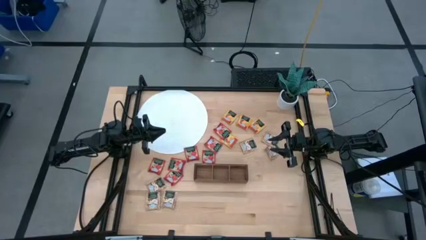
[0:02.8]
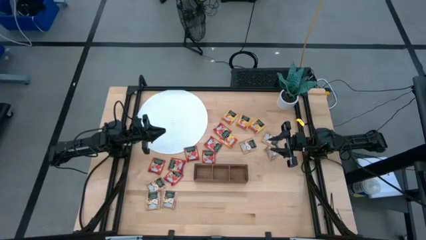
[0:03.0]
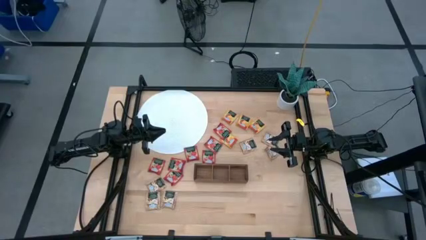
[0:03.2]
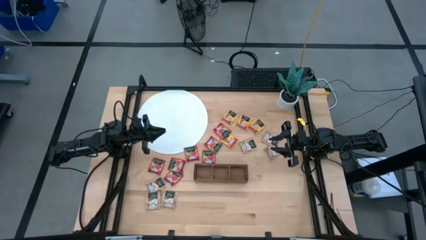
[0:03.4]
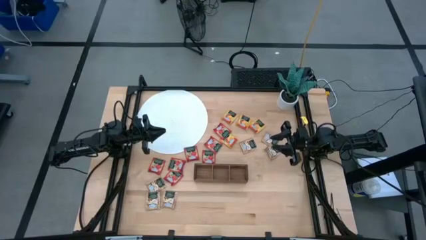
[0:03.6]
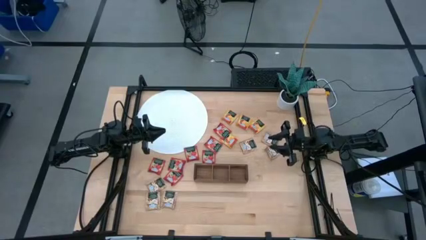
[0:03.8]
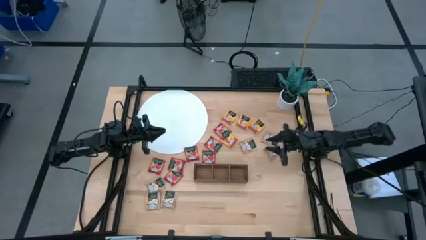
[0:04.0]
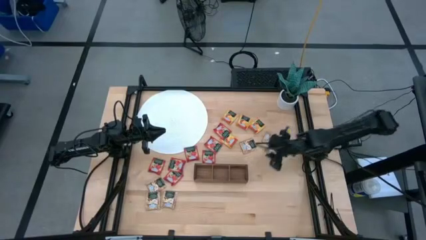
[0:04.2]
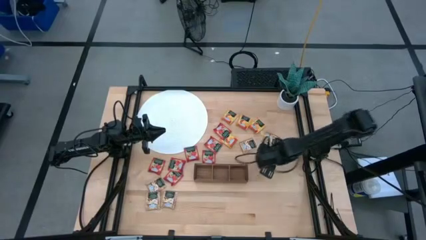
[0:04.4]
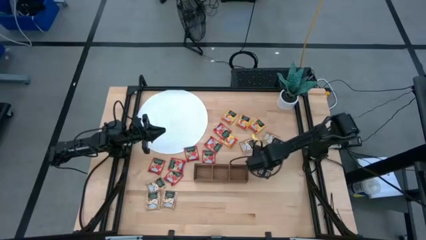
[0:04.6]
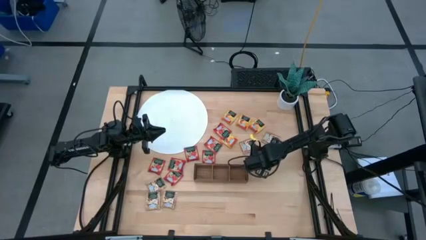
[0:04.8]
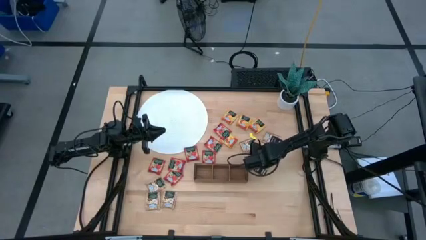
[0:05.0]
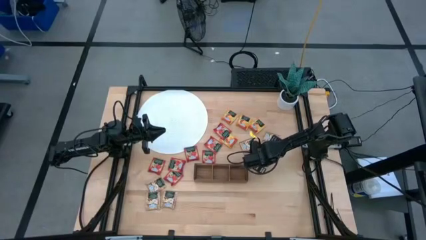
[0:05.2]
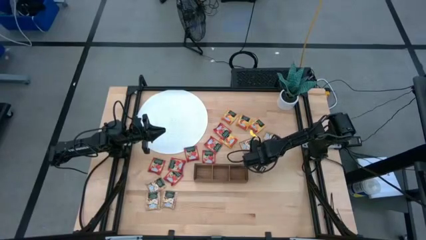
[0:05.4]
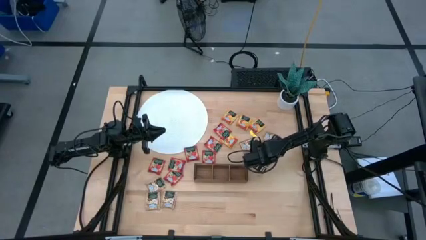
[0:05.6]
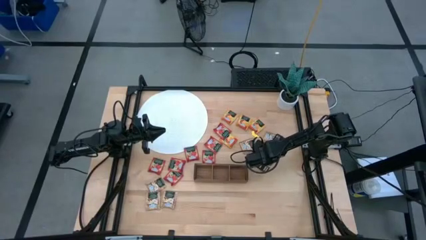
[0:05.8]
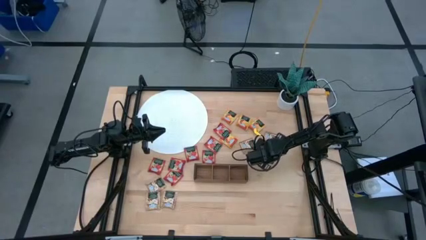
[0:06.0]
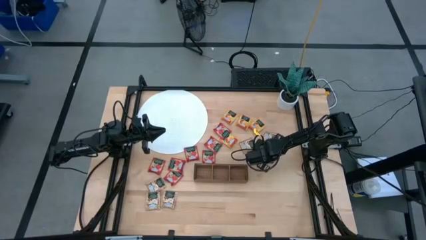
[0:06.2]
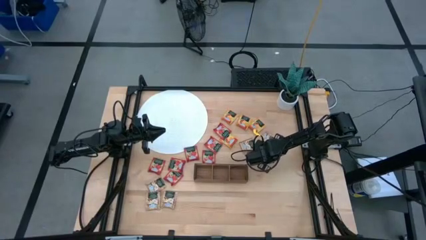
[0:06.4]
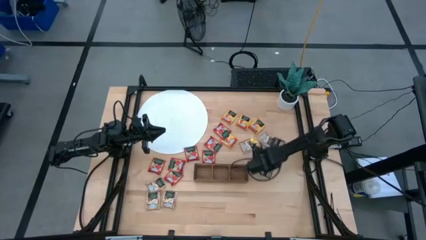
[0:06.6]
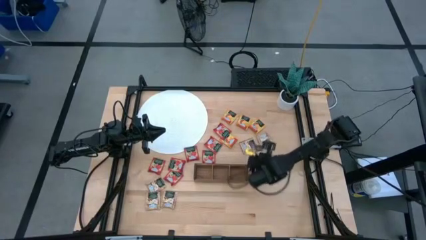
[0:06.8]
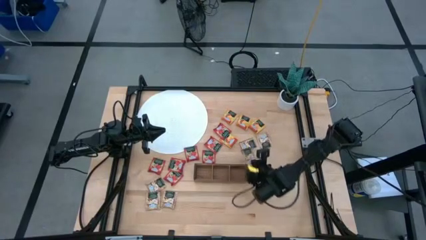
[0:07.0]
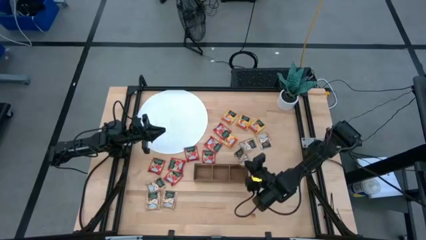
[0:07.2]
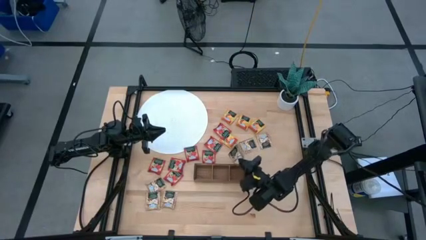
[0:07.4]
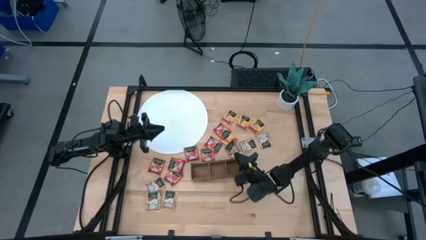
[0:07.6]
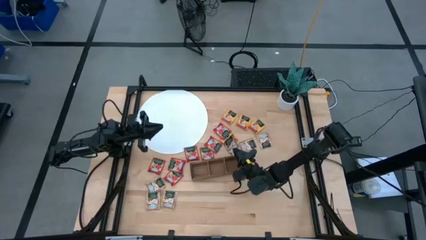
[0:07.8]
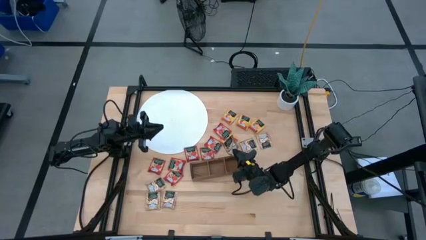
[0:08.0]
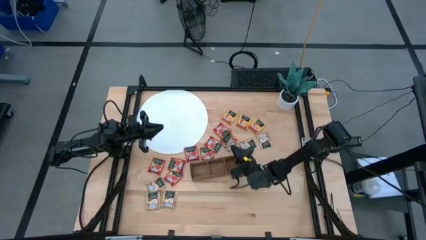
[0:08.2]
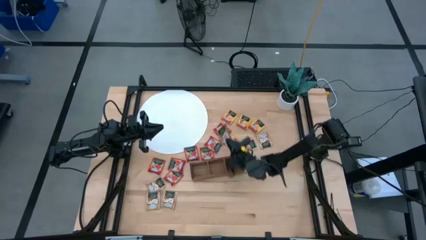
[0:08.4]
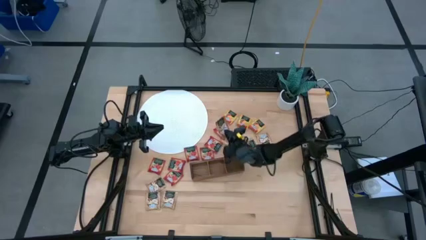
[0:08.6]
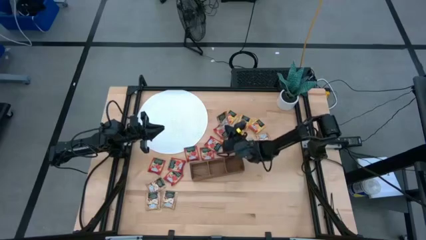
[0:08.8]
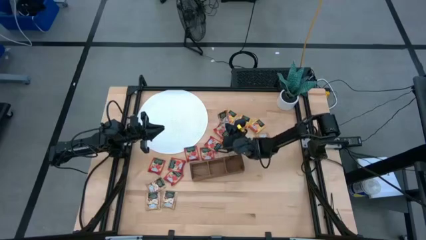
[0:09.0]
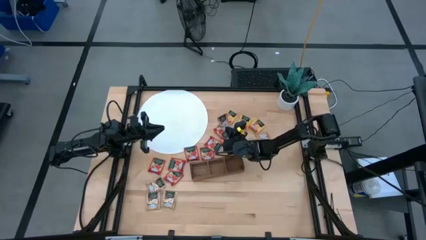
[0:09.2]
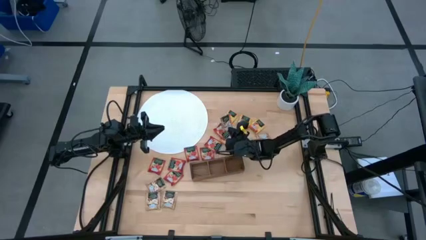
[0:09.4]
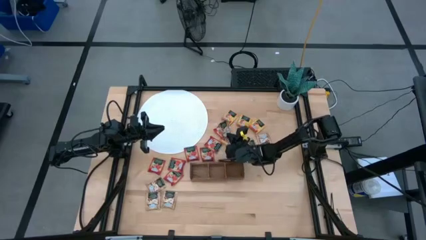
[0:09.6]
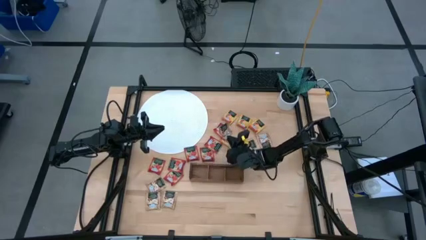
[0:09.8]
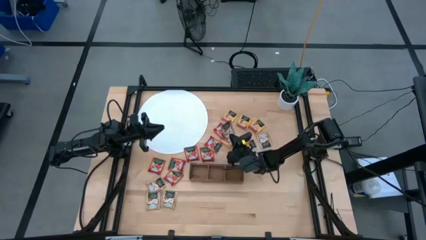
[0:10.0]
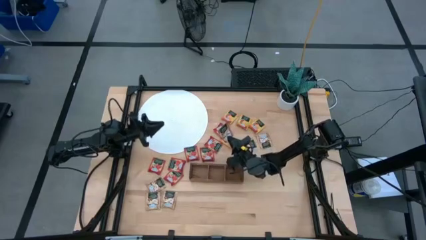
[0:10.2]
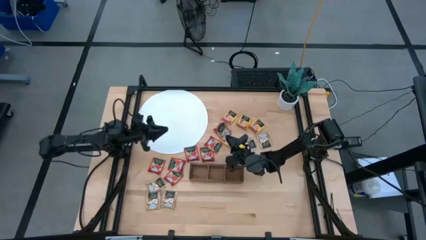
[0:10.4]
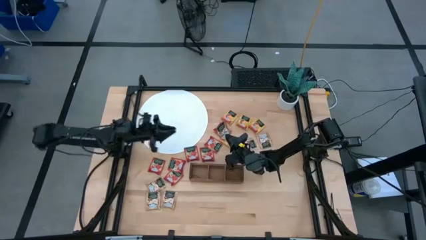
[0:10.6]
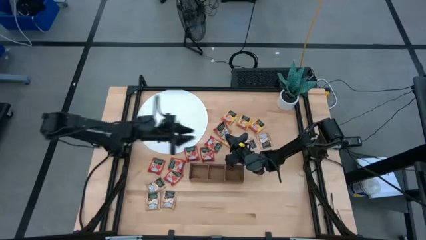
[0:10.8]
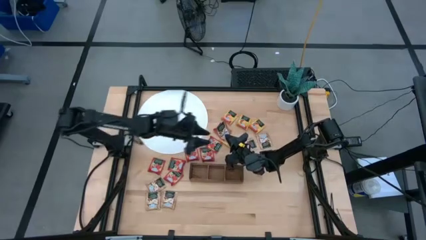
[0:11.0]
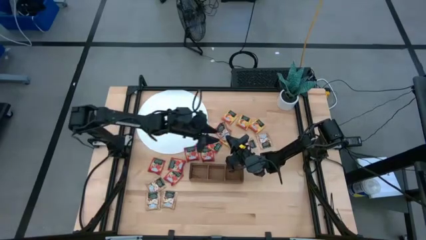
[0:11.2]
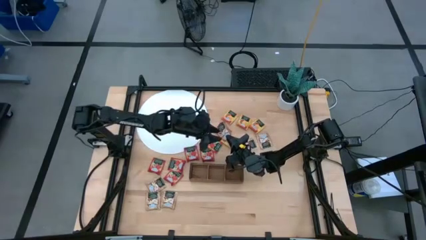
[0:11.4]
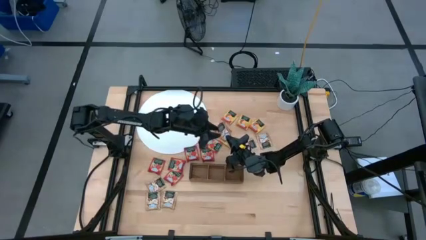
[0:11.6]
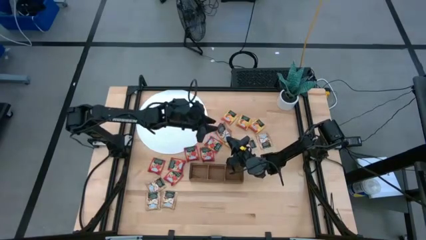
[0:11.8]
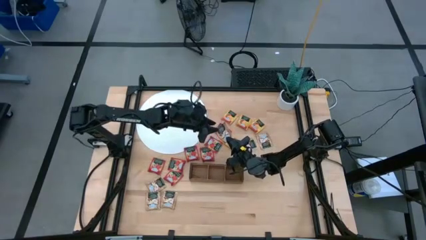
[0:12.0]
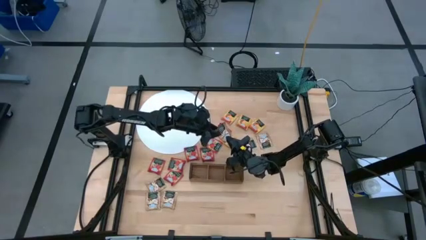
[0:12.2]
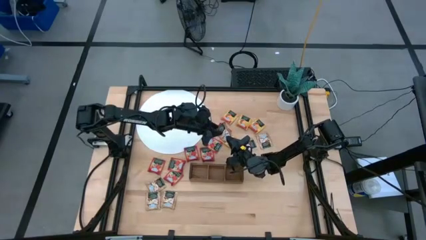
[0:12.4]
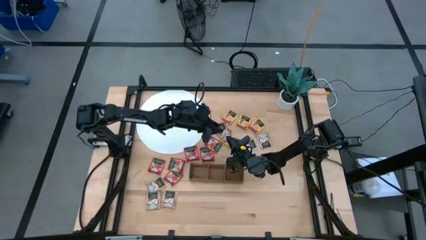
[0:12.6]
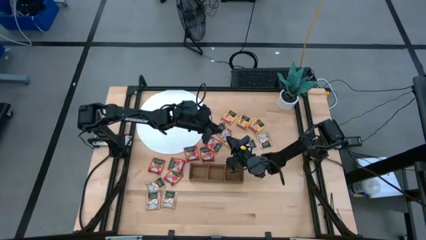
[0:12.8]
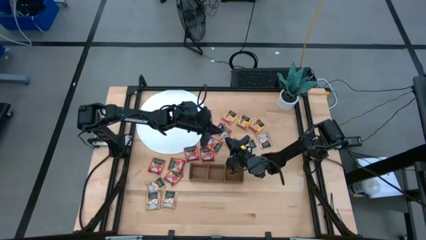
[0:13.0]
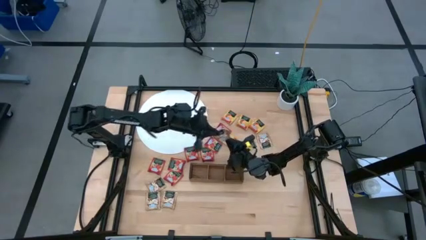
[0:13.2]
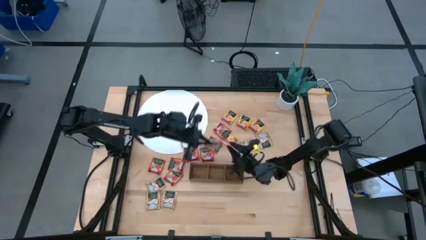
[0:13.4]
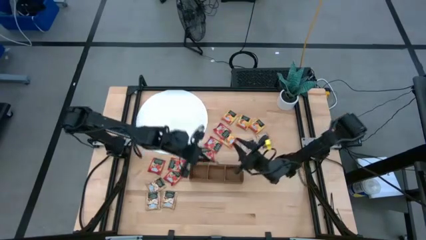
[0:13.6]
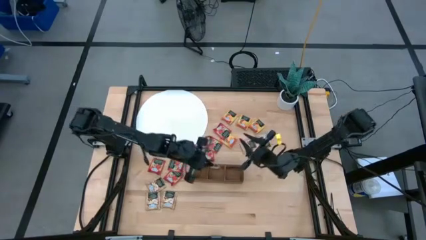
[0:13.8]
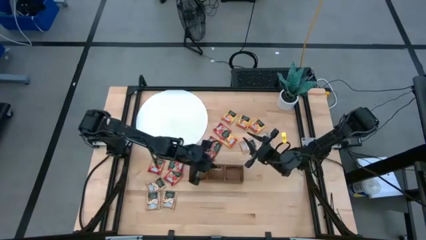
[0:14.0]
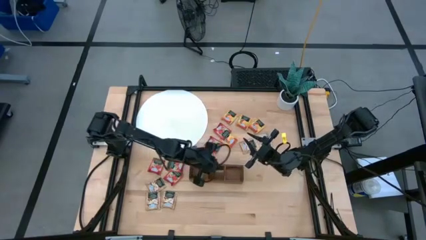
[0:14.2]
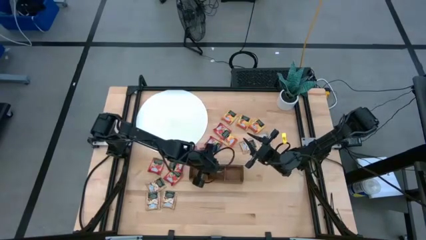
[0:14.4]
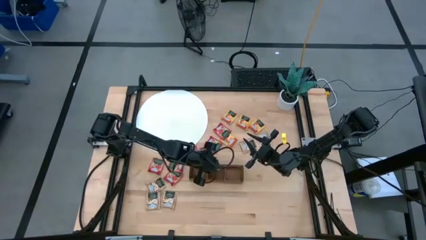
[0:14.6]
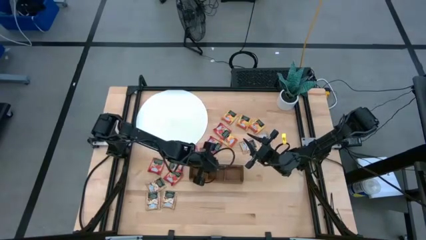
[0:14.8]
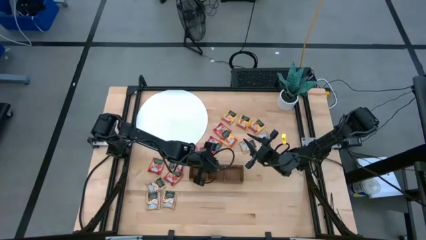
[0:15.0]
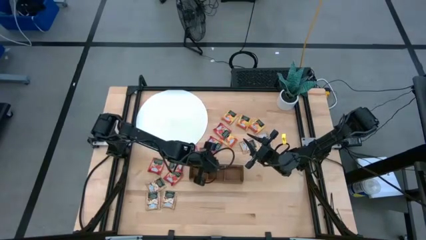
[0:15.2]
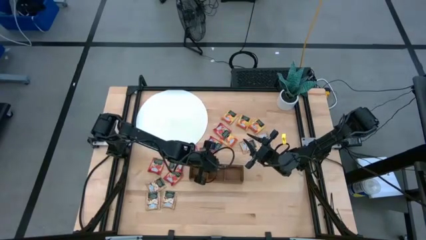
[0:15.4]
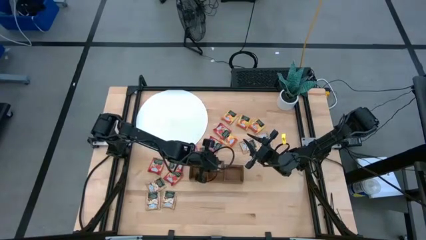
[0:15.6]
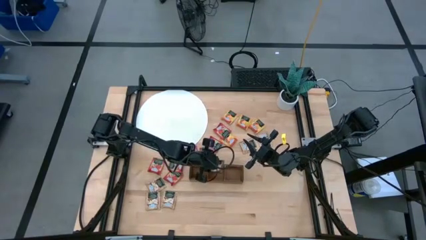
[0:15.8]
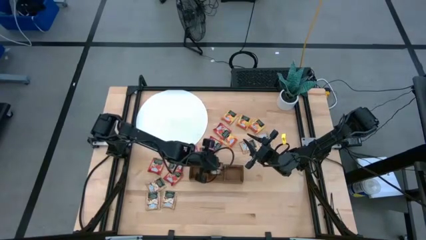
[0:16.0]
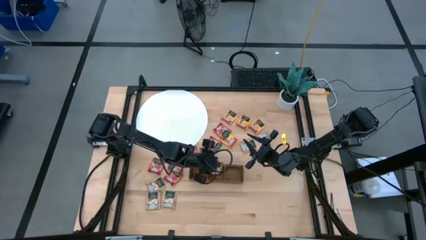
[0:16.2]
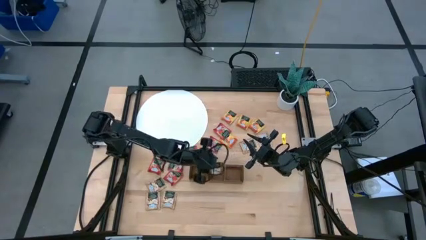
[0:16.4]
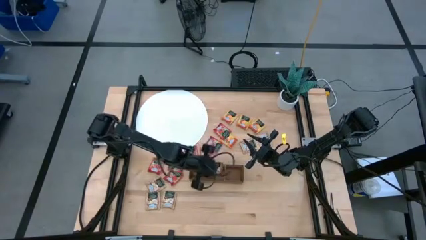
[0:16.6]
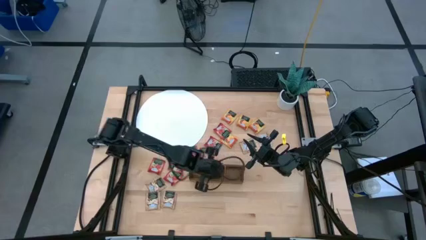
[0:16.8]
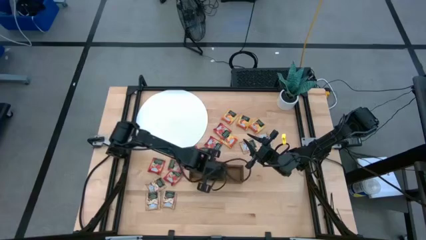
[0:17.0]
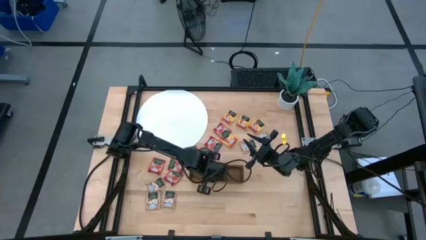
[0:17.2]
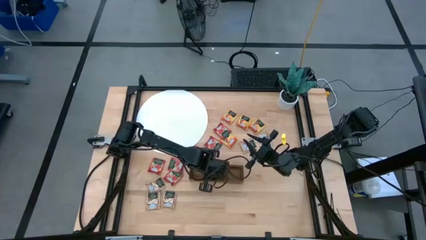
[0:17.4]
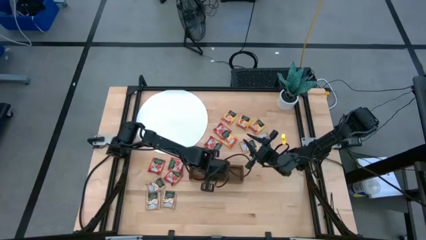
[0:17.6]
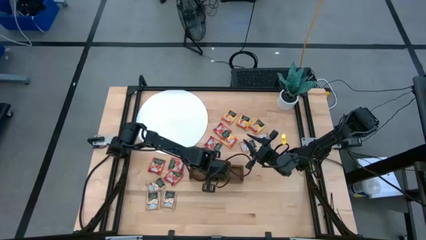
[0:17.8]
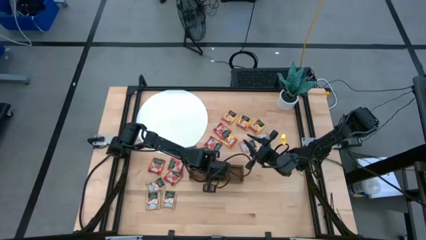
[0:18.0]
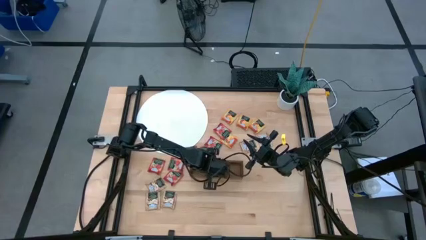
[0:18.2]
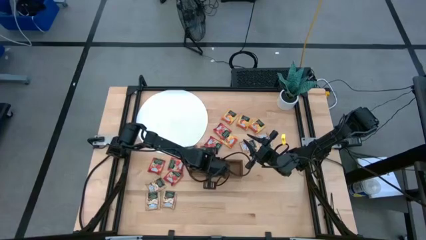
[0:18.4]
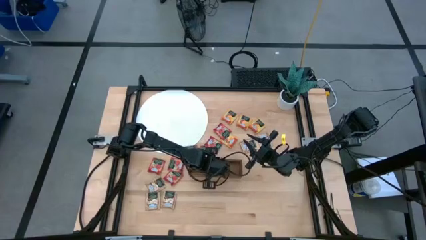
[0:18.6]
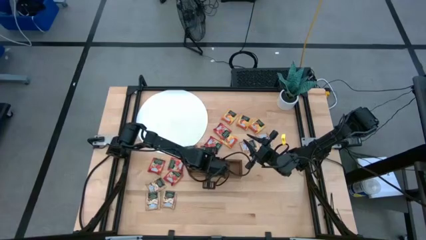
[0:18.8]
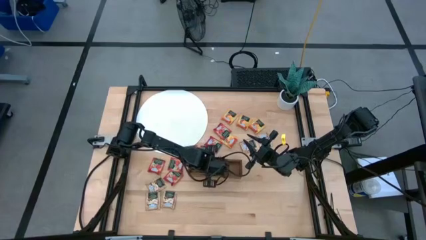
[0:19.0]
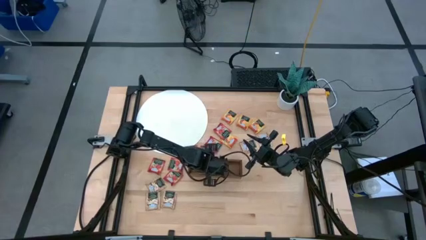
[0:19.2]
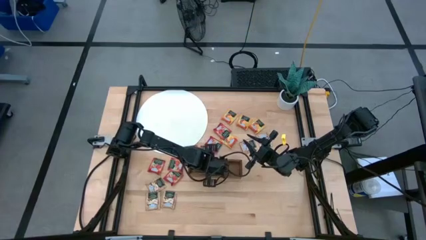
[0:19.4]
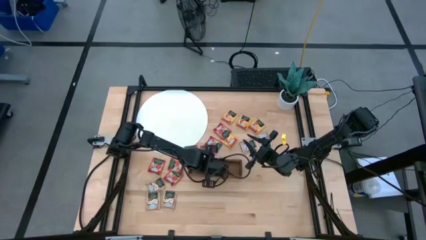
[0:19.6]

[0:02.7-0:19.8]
Task: Pick & Place Tea
Put the brown tea bag into the middle section of the wooden organizer
